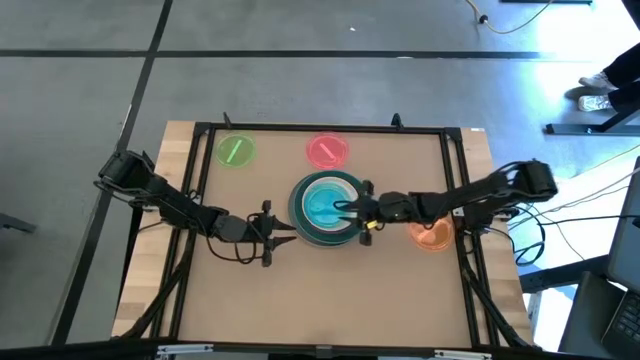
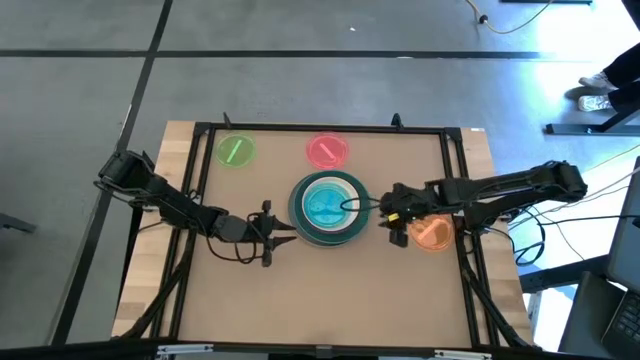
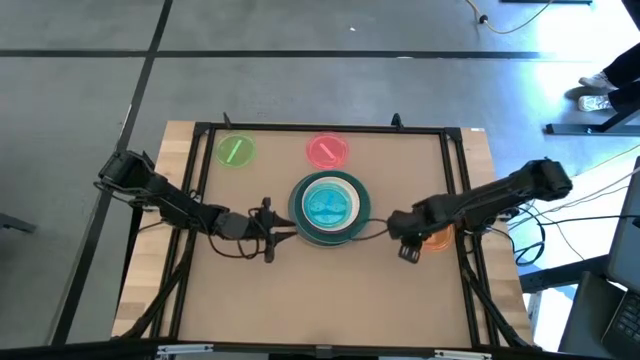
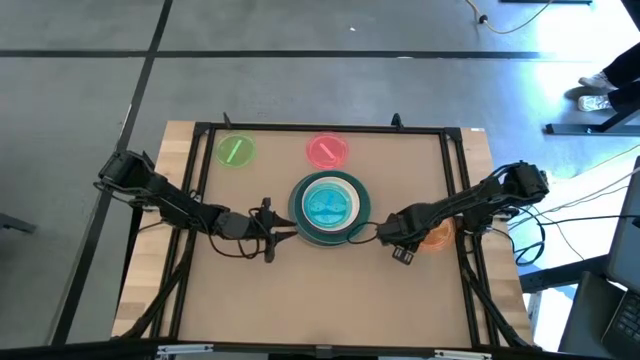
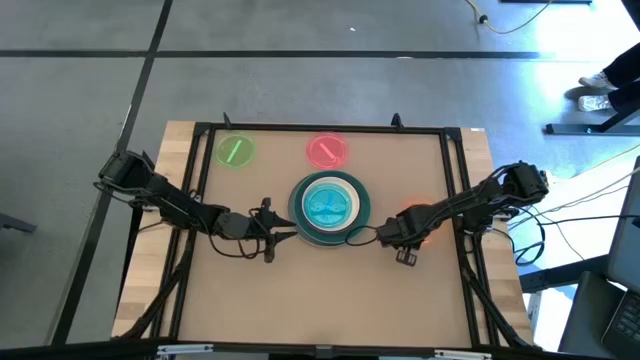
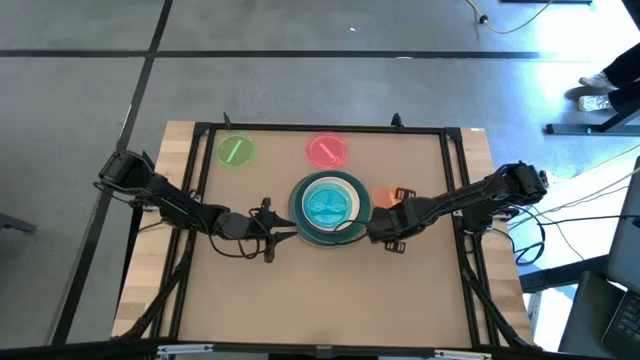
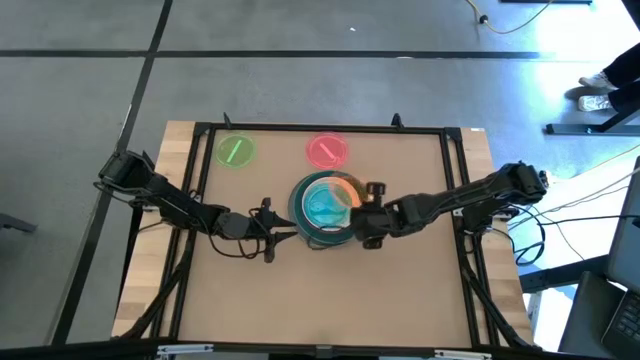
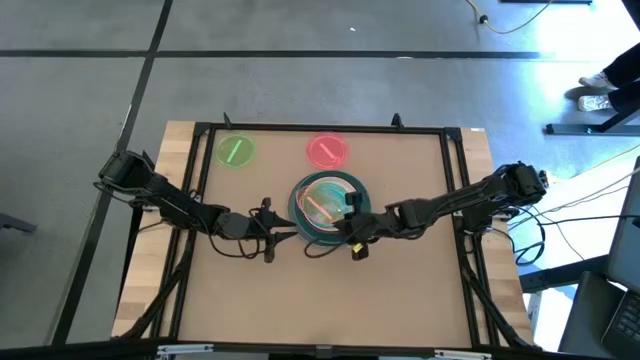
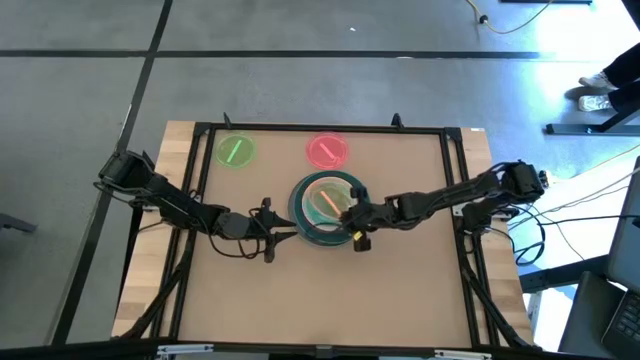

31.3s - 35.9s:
Task: Stack plastic plates
Stack the light orange plate on top of the blue plate

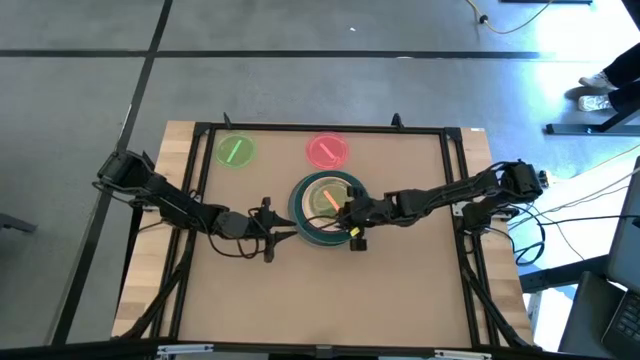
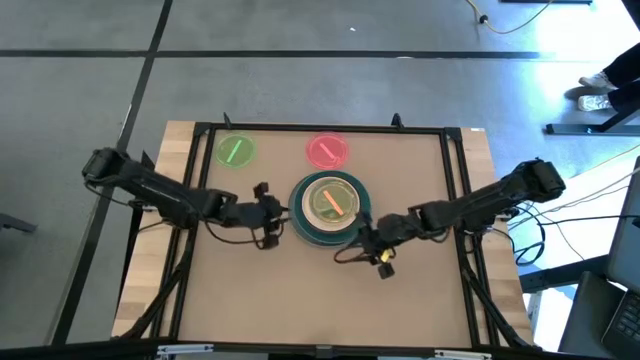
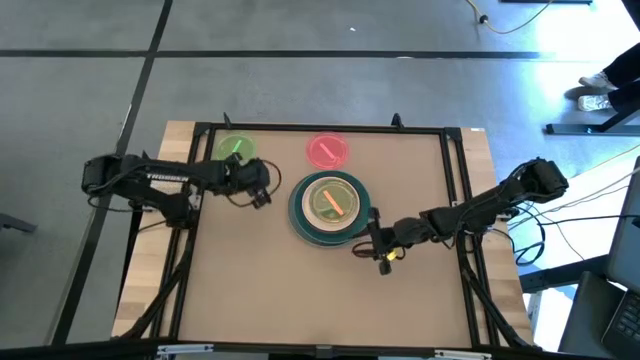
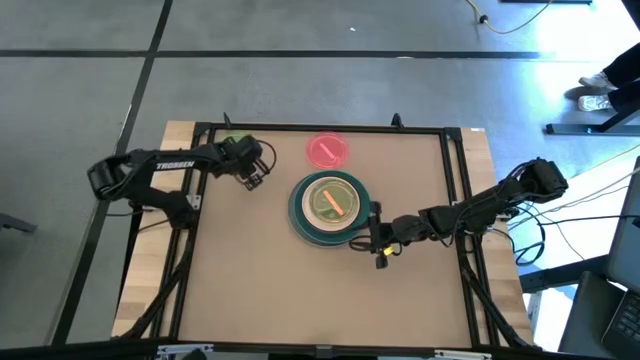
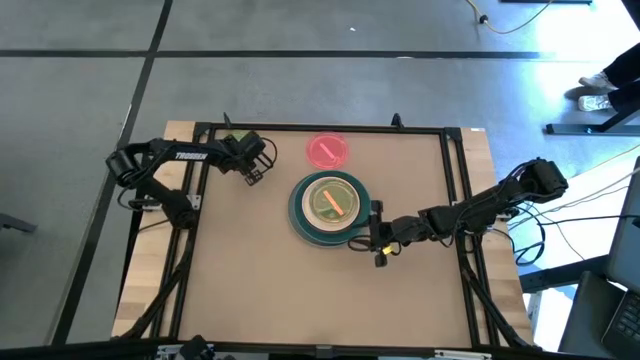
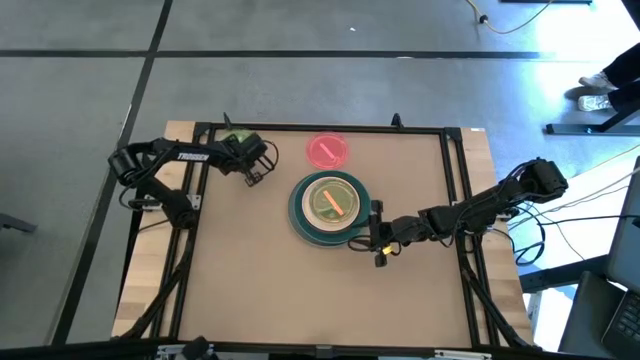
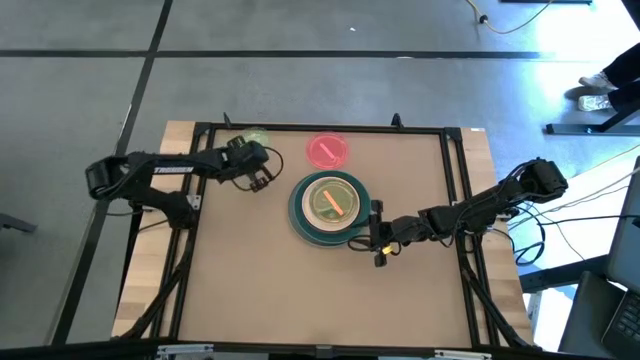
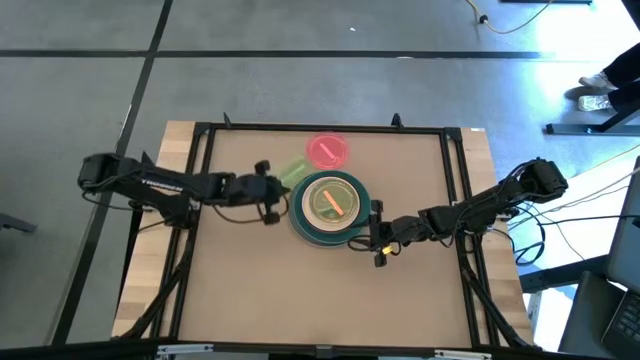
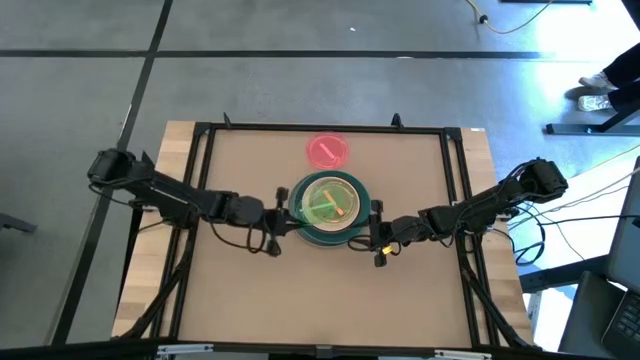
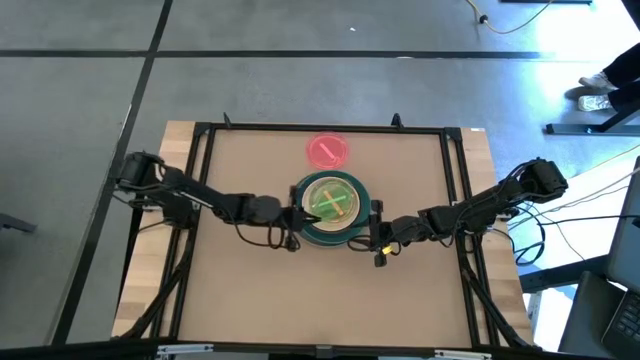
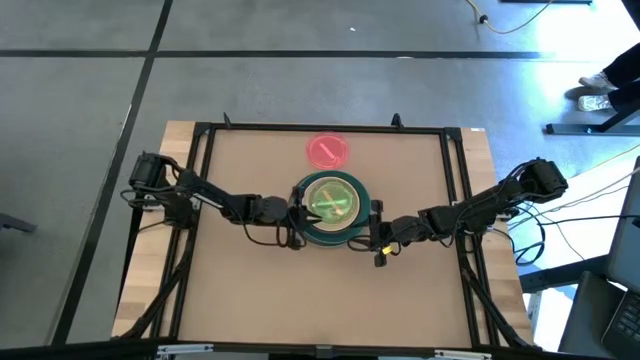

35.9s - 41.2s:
Stack the light green plate on top of the light orange plate

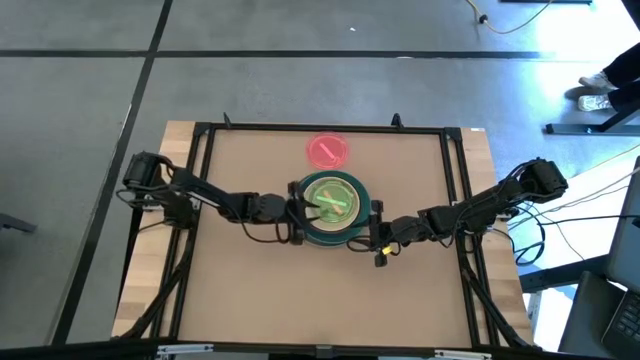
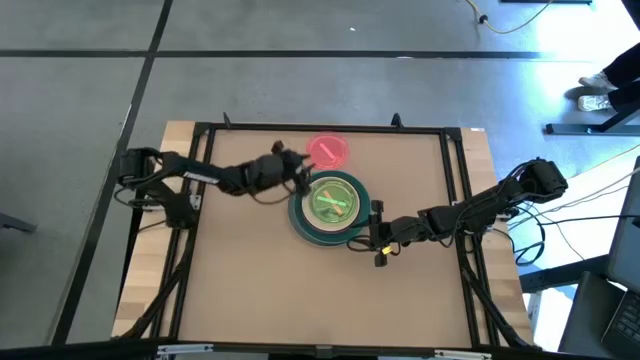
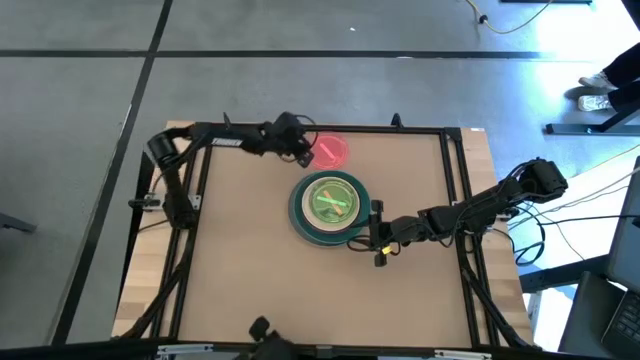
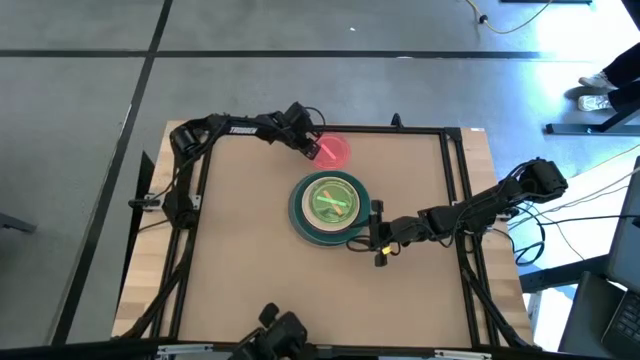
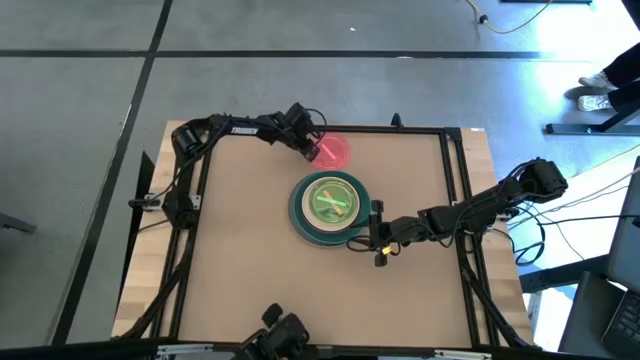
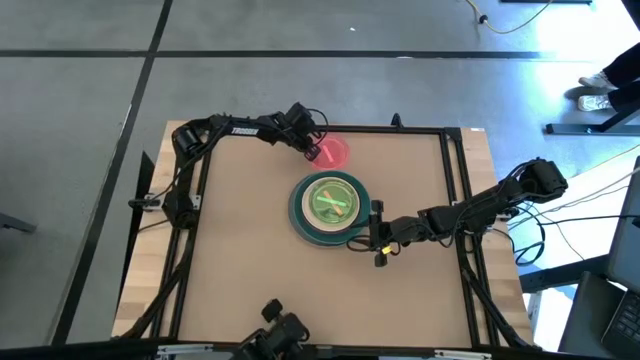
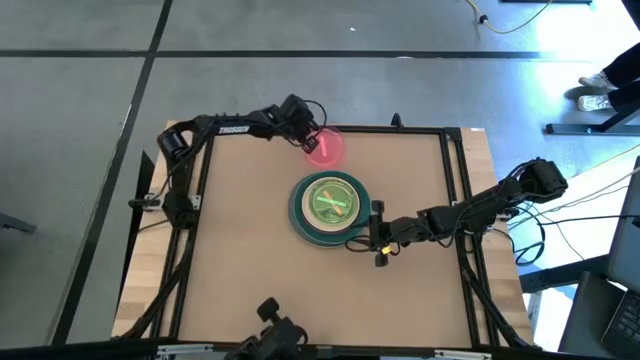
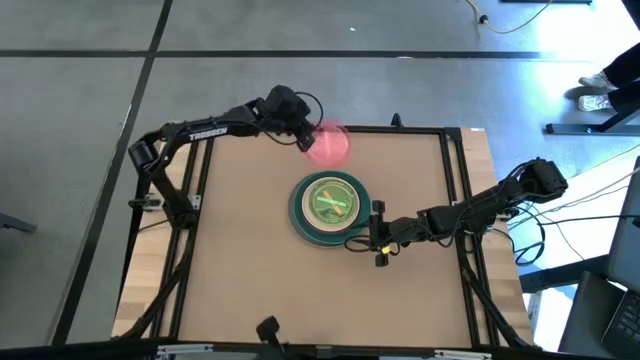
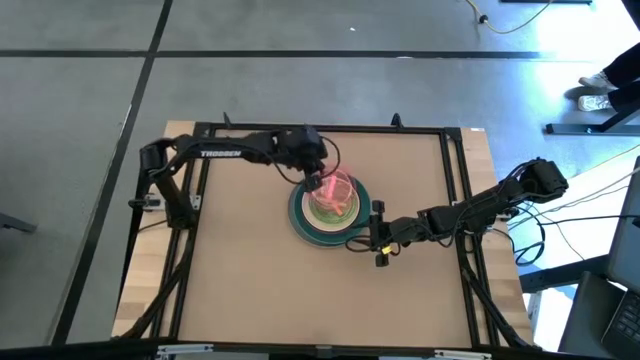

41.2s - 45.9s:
Stack the light pink plate on top of the light green plate

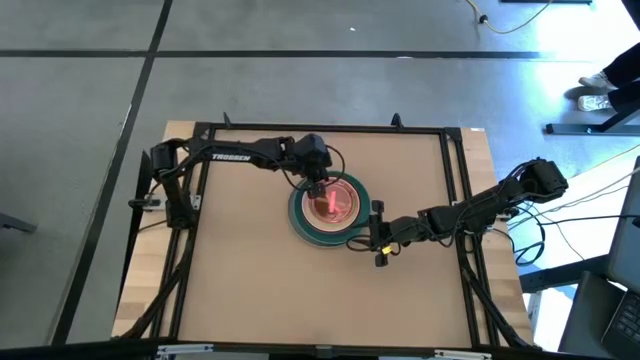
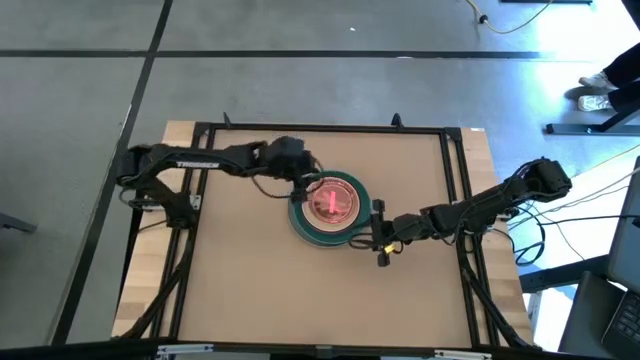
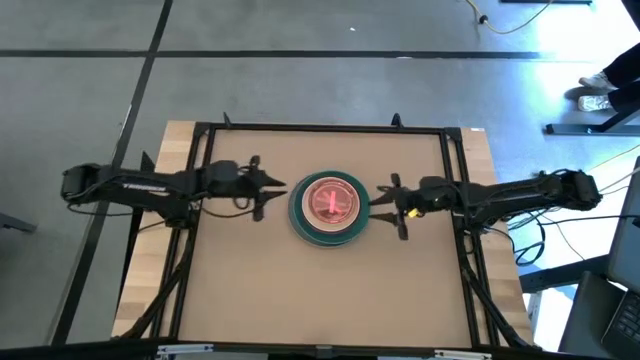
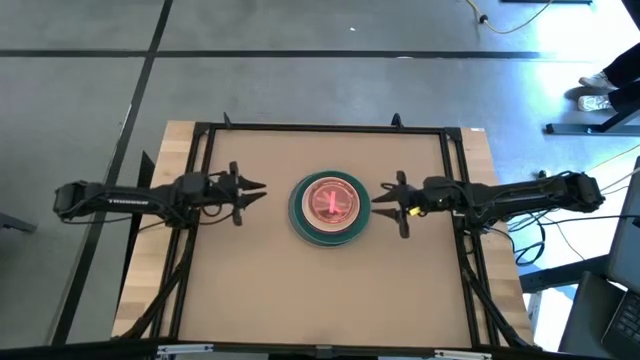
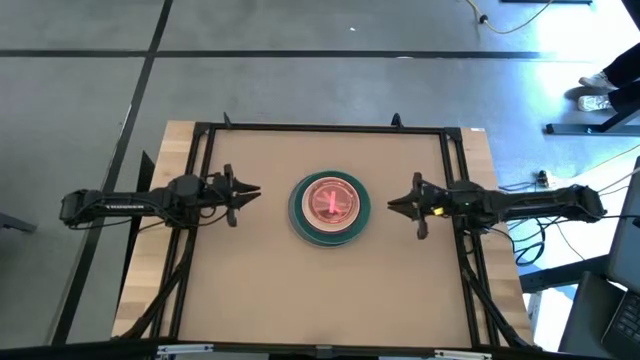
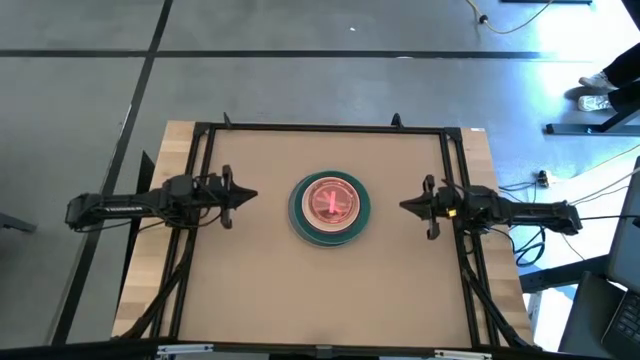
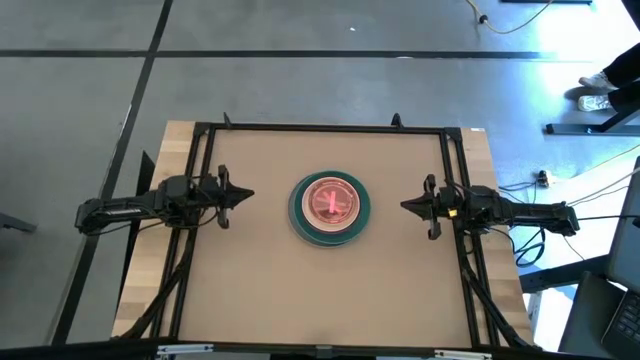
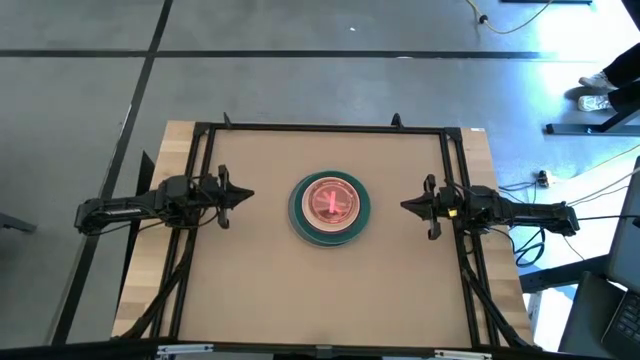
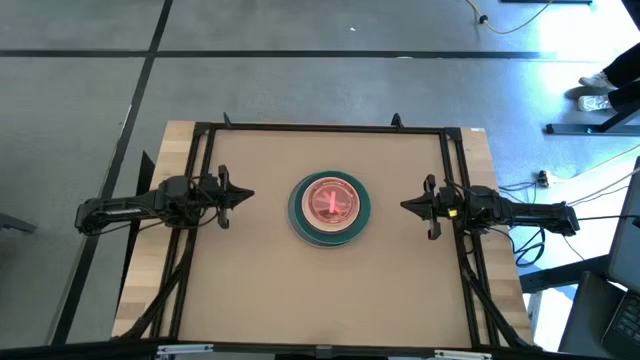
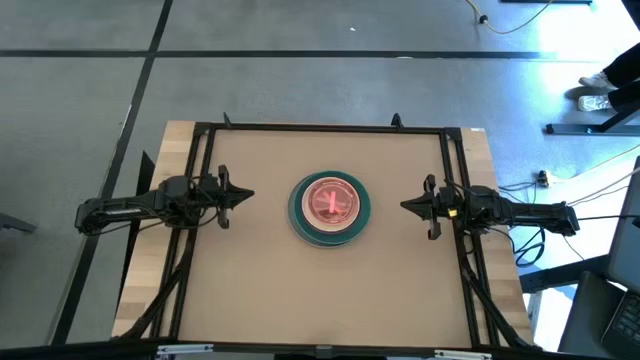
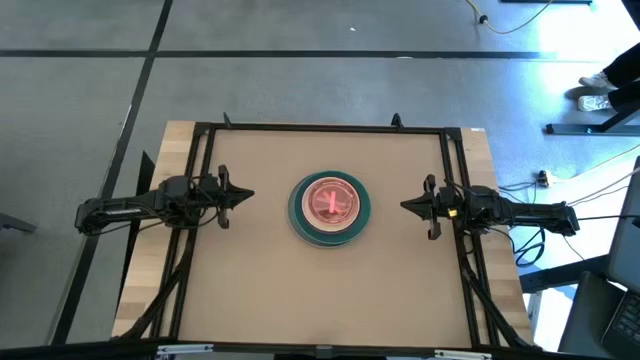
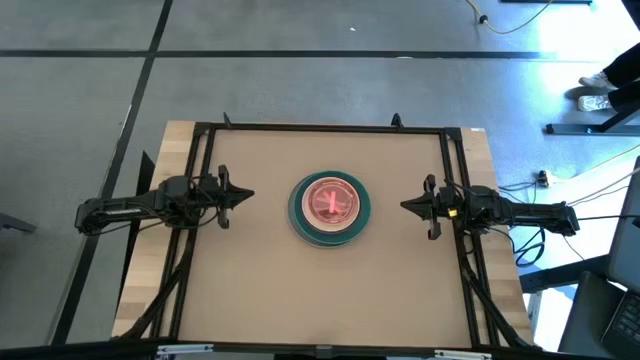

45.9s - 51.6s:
Return to Home Position
